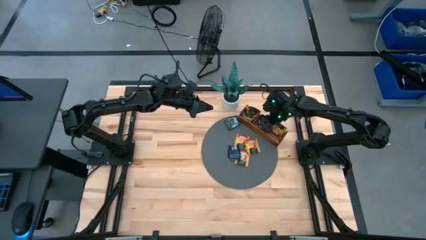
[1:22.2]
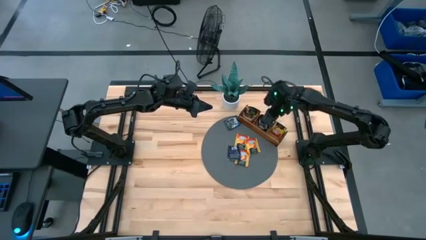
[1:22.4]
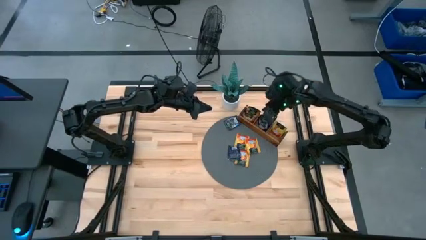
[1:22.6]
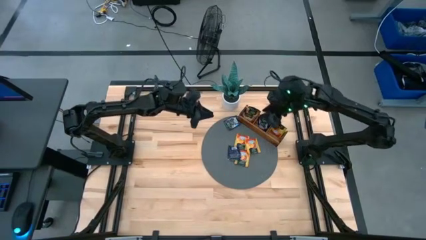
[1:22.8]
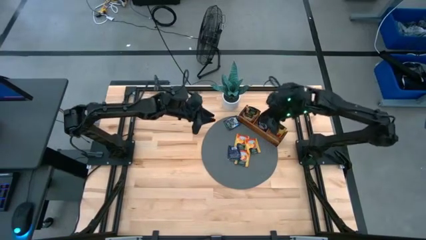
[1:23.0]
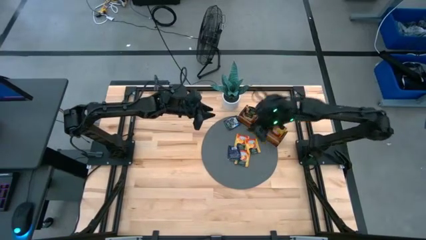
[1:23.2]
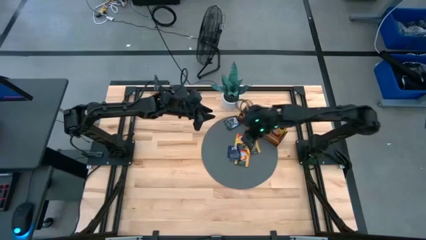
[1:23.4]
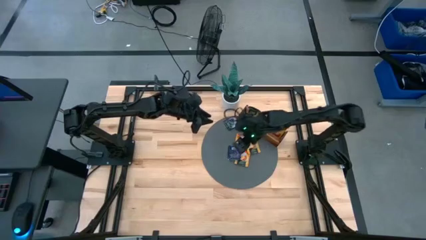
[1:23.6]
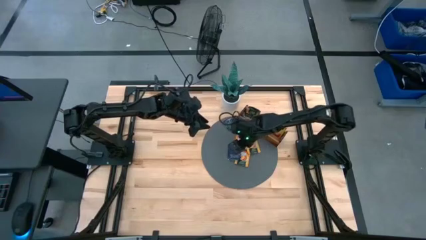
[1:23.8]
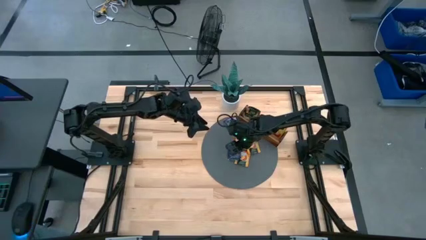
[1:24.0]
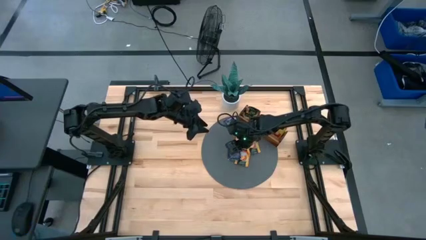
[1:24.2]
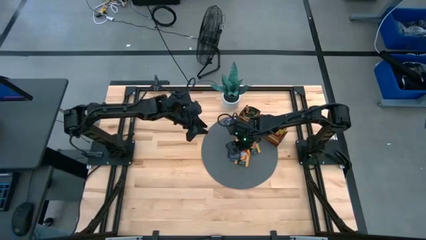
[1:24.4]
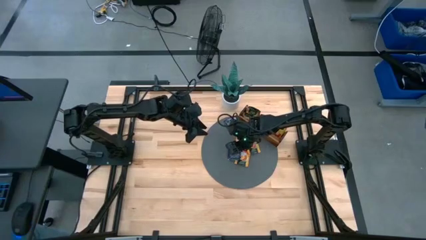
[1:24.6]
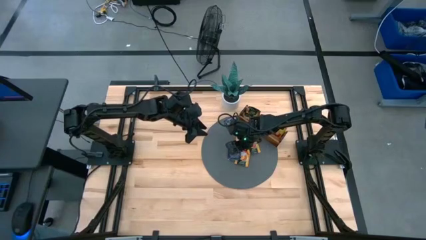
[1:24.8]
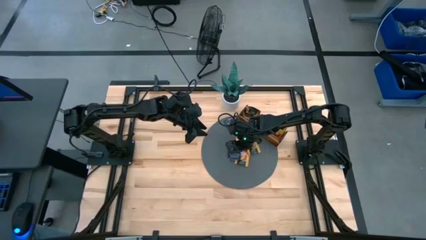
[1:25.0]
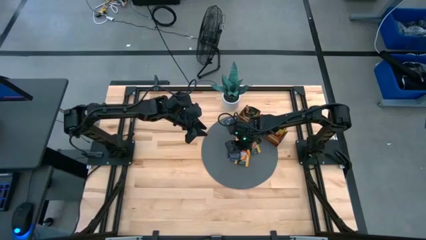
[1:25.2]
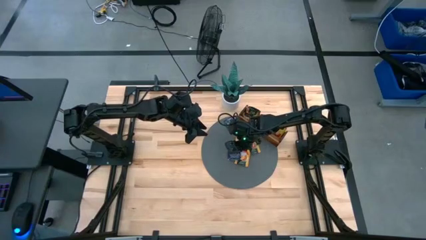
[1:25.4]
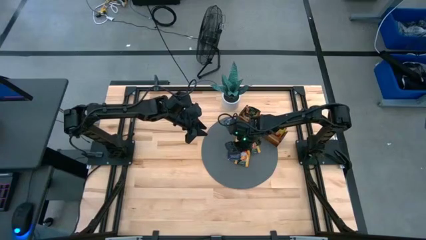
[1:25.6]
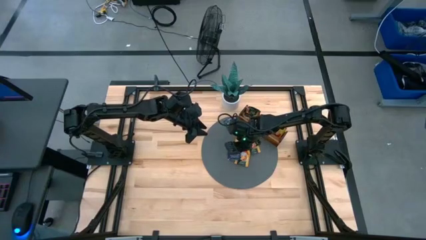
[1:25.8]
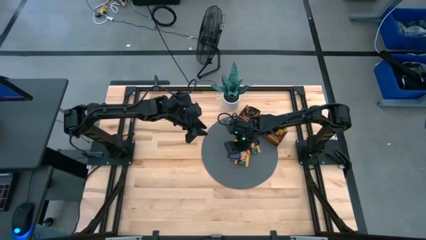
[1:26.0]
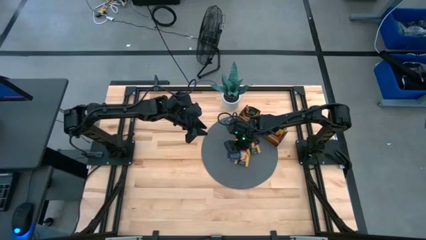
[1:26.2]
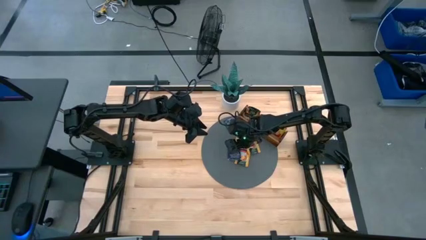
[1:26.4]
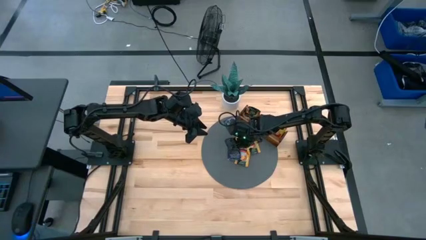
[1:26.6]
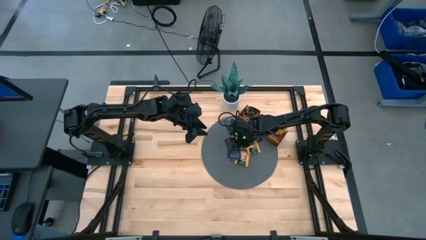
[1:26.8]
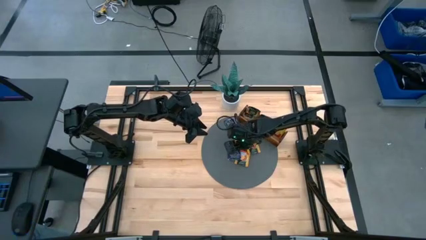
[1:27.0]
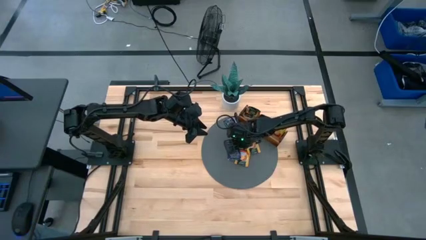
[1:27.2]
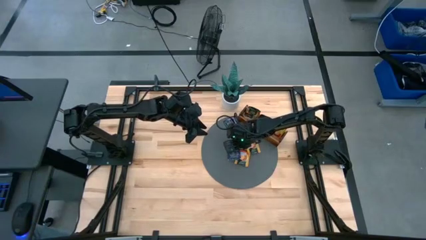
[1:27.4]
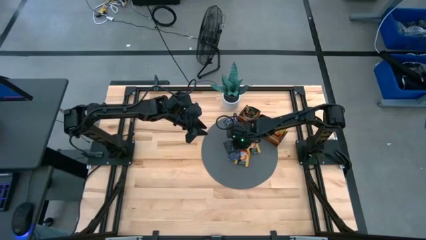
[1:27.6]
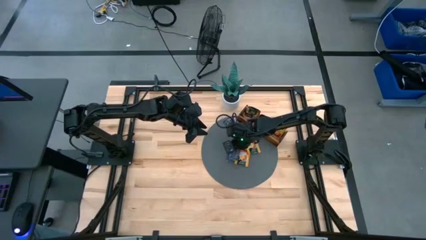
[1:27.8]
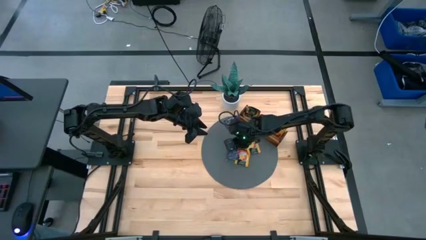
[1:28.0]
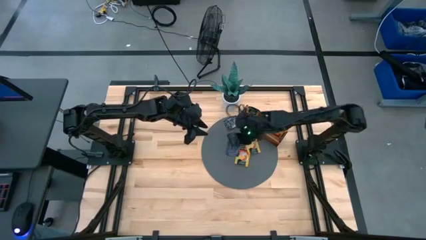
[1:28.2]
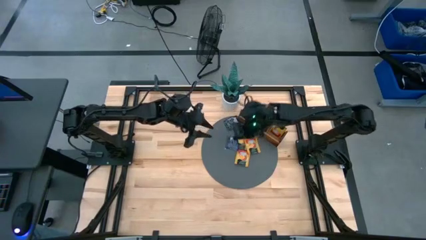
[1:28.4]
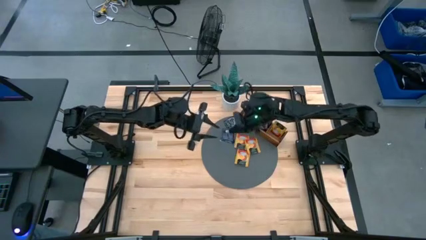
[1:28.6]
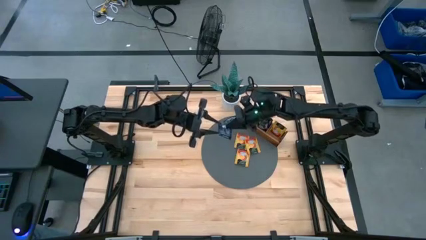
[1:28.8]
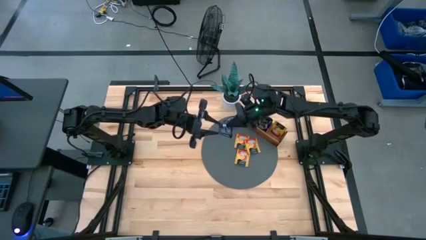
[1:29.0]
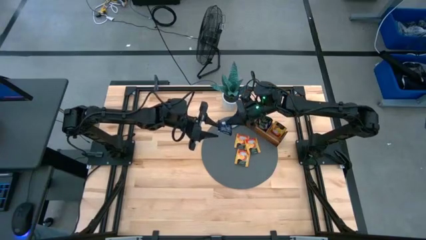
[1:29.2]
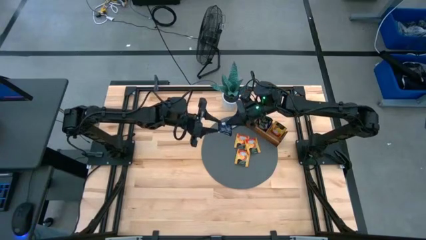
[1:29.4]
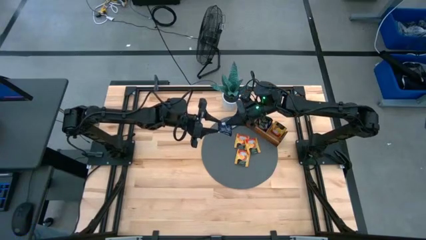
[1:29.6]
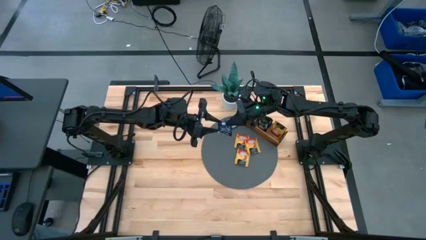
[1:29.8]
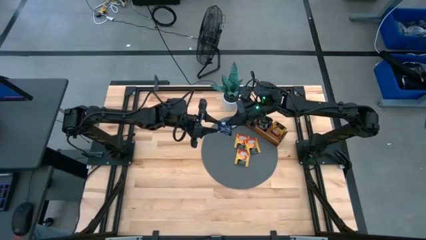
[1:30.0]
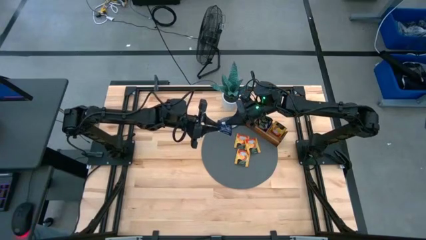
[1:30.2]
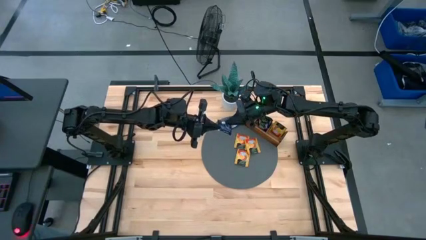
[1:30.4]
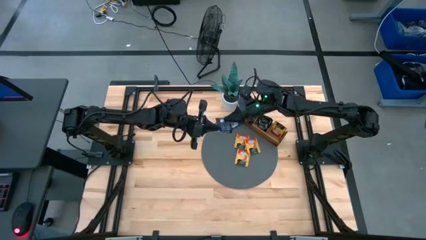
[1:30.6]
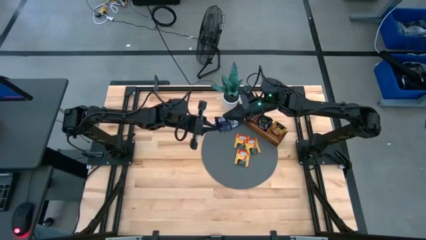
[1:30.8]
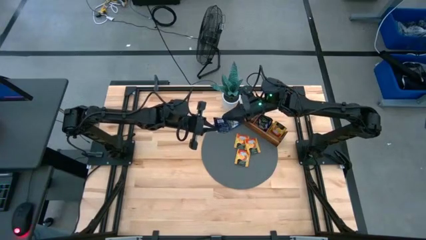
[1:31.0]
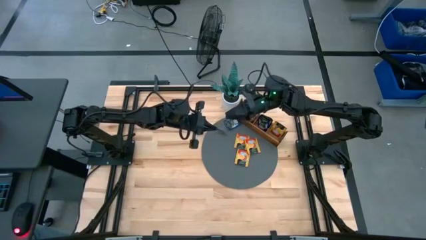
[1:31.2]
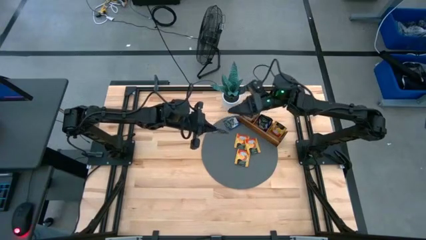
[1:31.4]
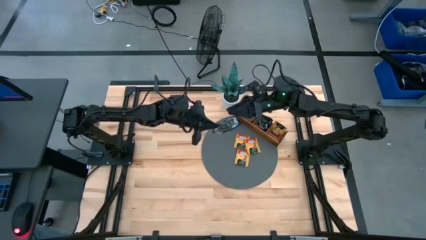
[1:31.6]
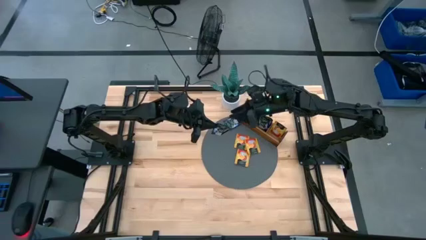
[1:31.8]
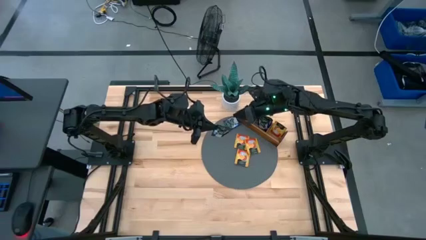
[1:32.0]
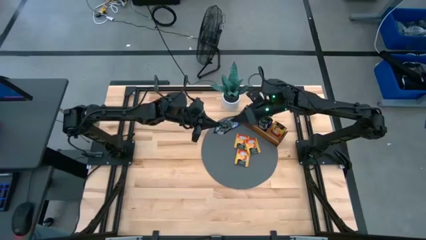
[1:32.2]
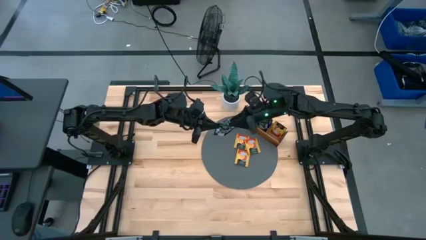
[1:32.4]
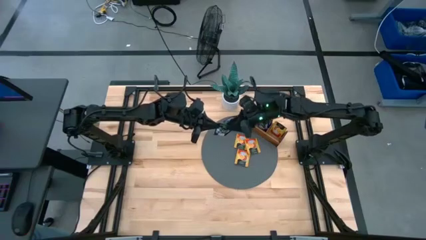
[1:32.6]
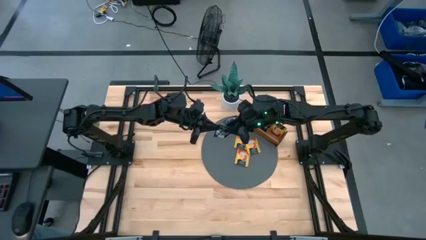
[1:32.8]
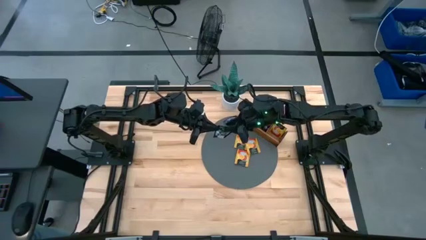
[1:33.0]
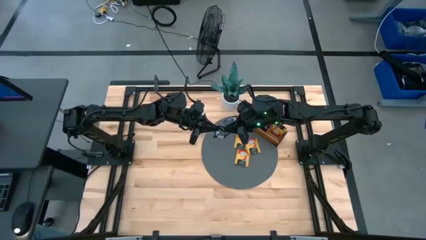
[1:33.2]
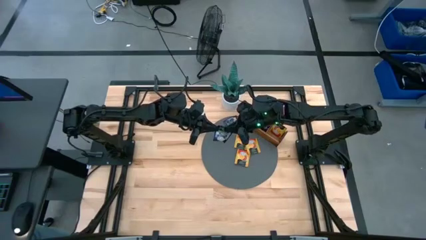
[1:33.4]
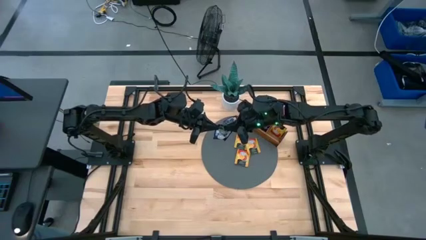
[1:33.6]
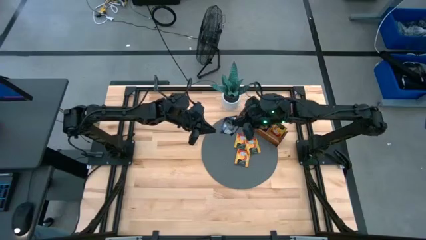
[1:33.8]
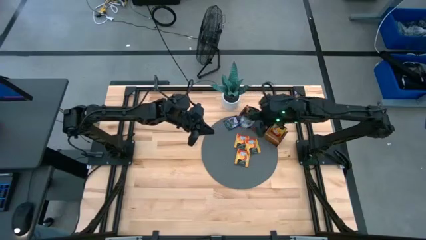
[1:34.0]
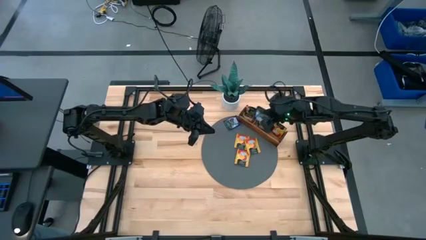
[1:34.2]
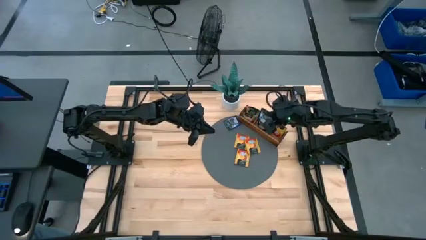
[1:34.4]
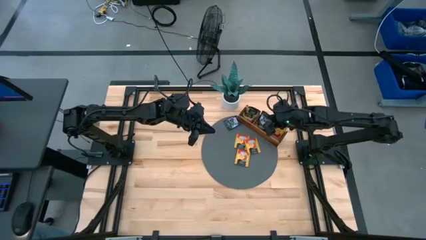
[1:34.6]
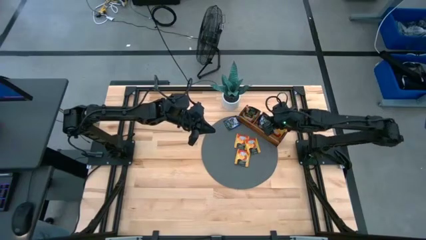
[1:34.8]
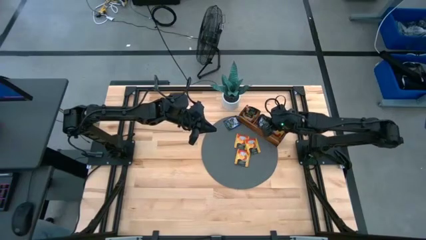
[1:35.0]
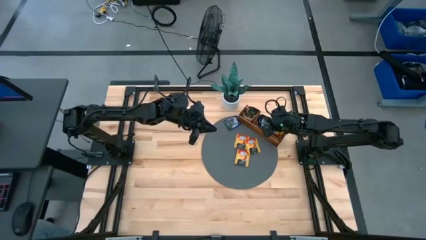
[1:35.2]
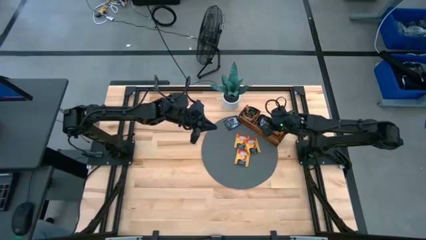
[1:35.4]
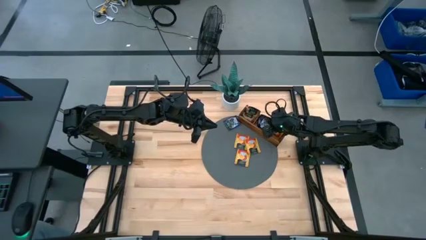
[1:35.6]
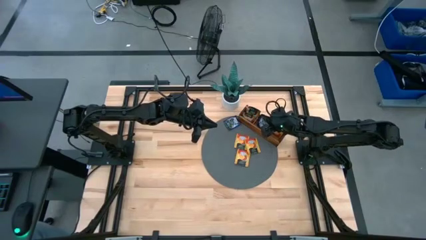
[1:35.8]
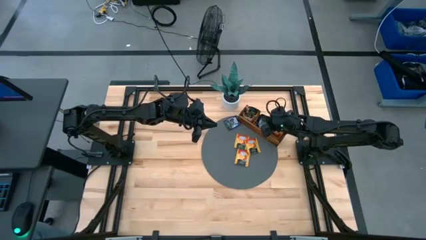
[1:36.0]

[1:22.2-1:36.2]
Task: Pick & Place Tea
Put the purple tea bag into the wooden organizer
